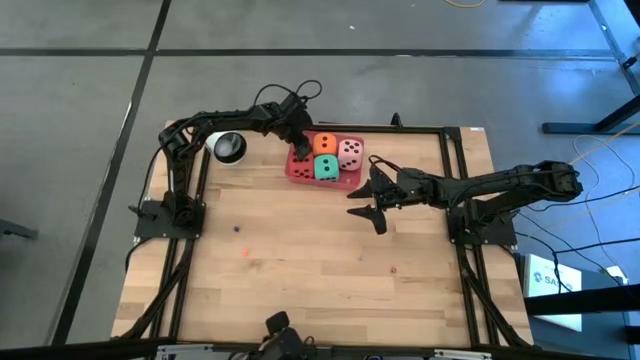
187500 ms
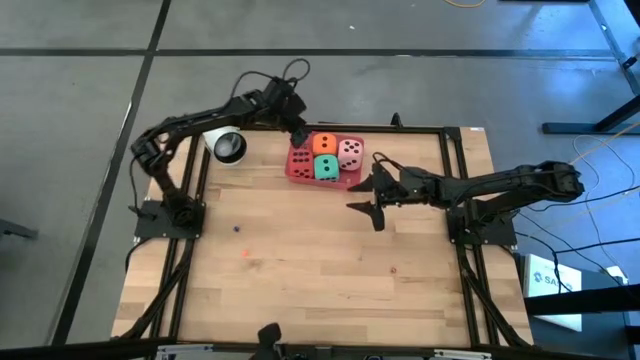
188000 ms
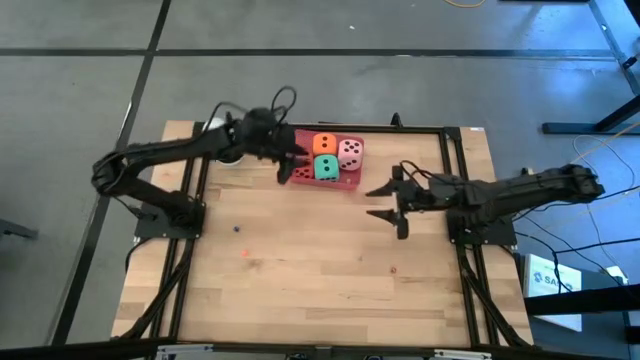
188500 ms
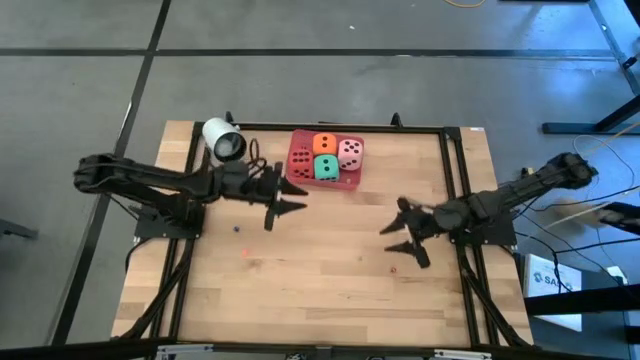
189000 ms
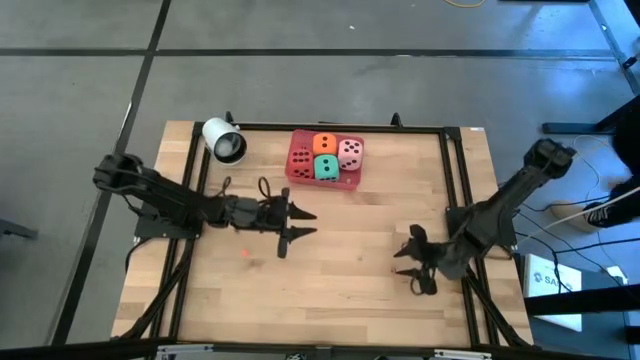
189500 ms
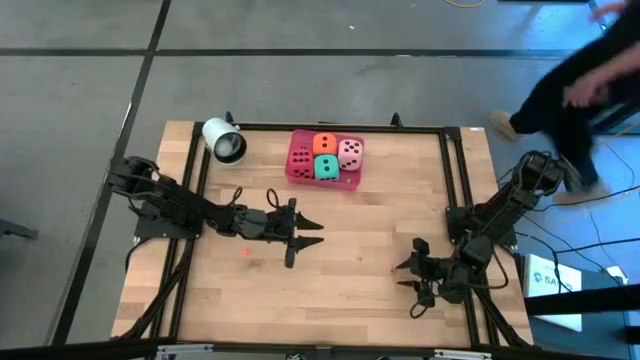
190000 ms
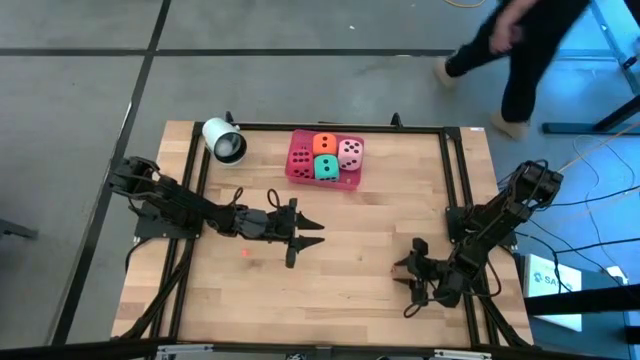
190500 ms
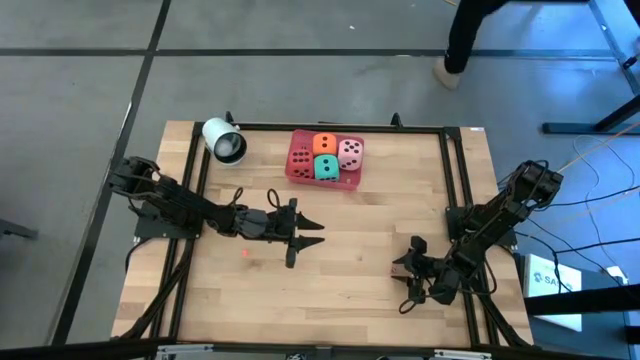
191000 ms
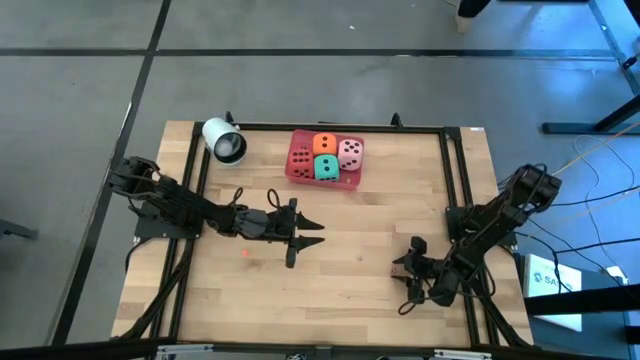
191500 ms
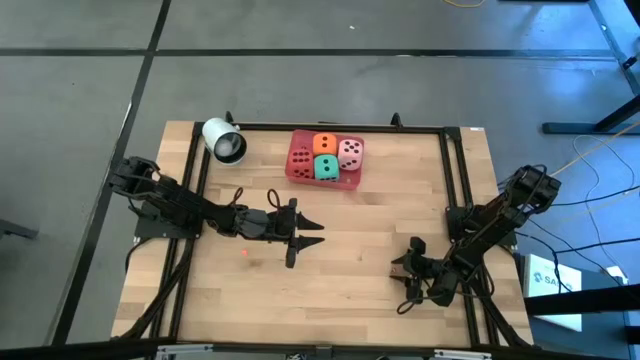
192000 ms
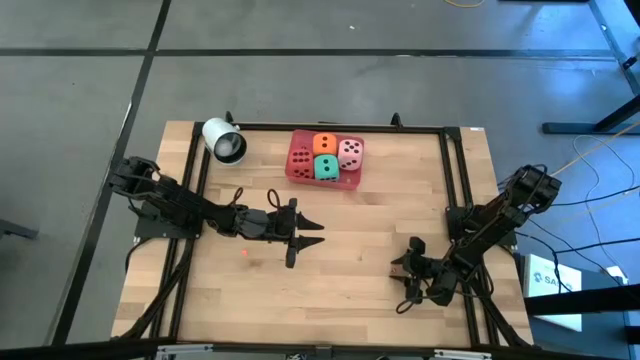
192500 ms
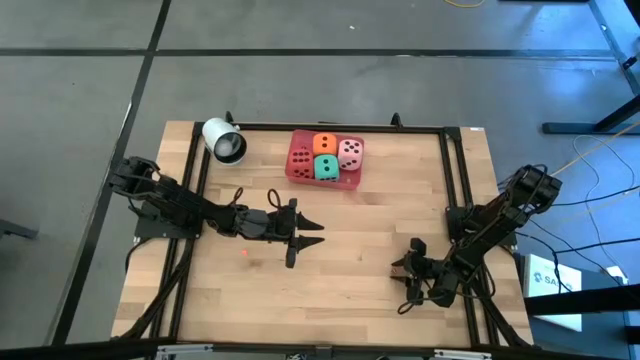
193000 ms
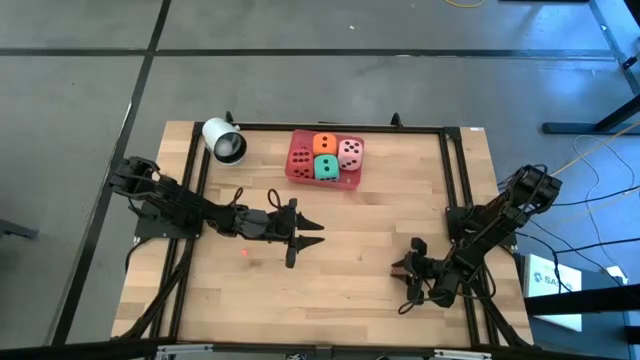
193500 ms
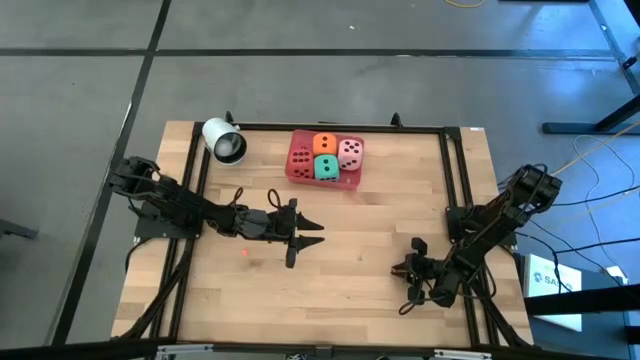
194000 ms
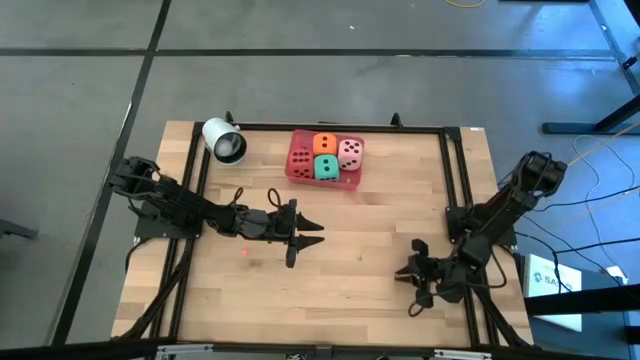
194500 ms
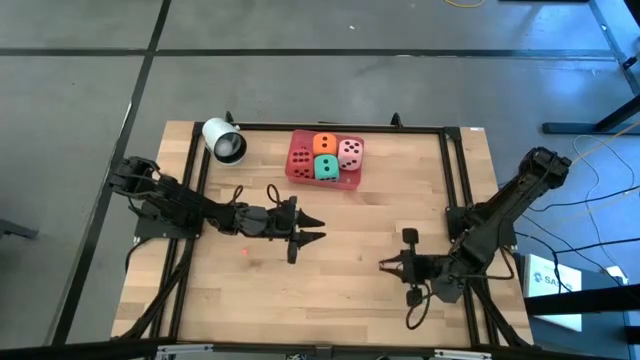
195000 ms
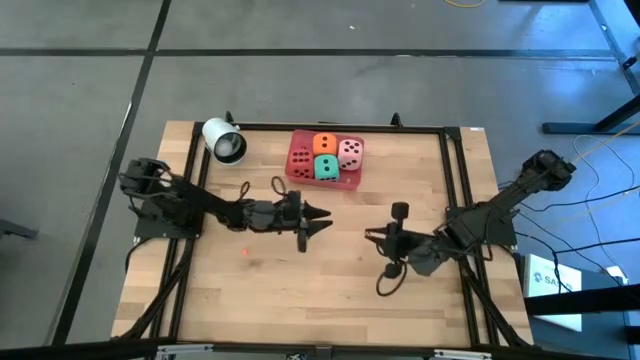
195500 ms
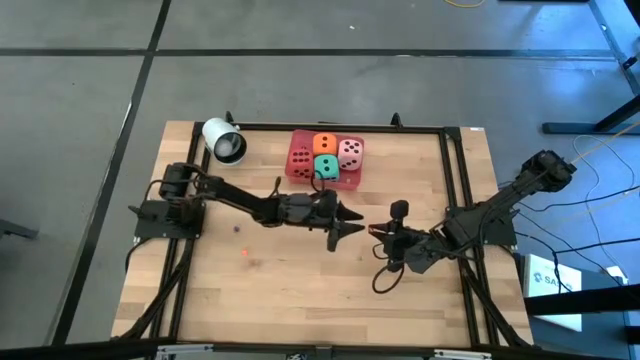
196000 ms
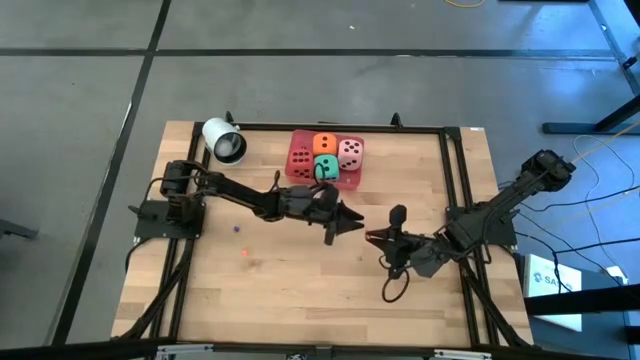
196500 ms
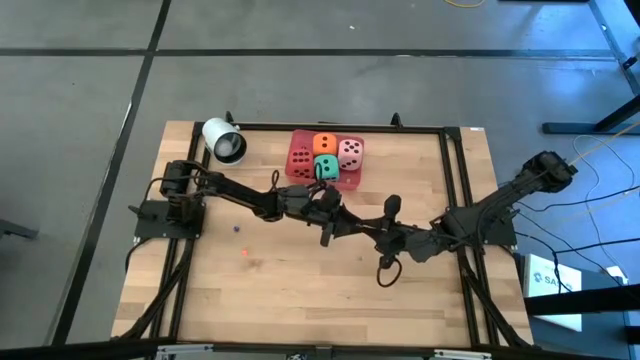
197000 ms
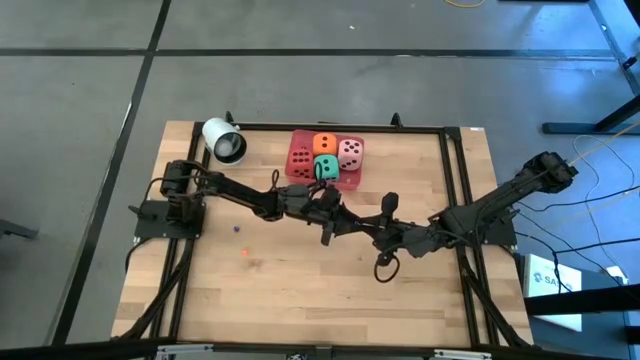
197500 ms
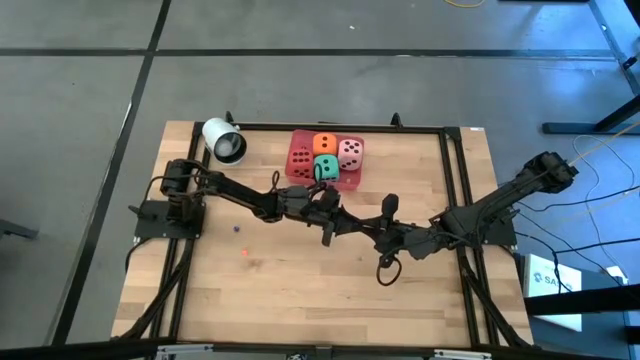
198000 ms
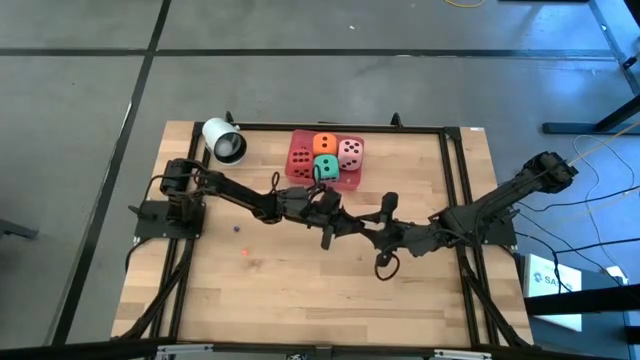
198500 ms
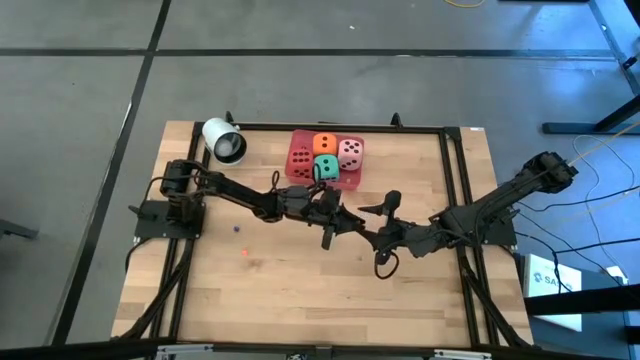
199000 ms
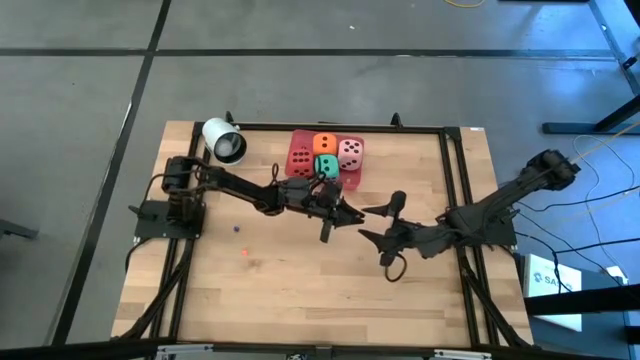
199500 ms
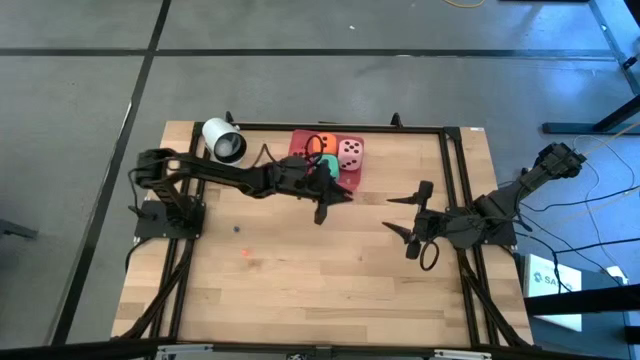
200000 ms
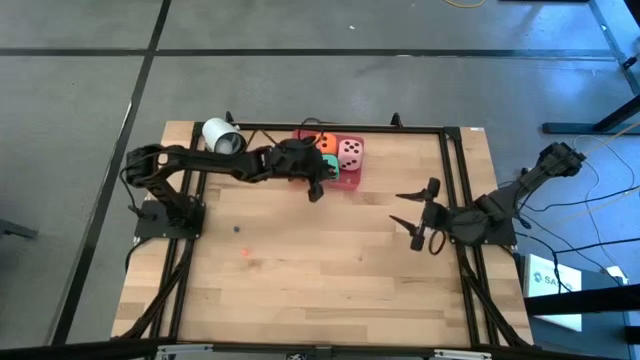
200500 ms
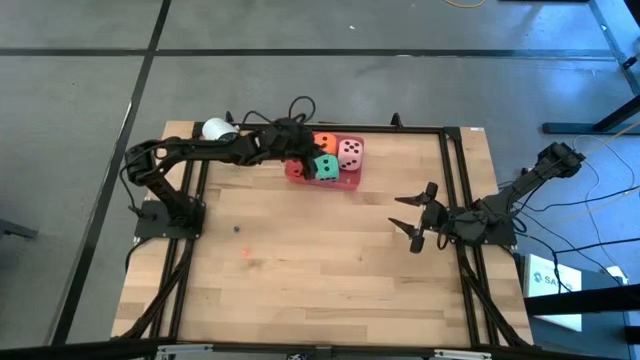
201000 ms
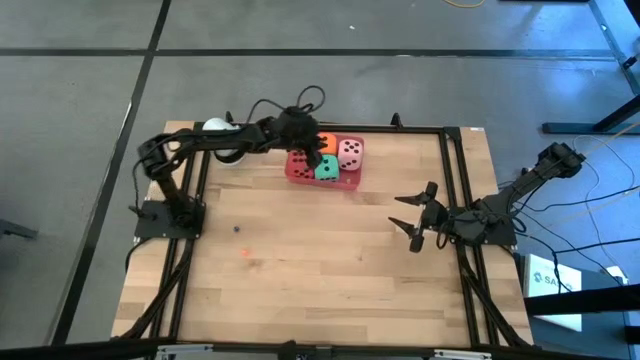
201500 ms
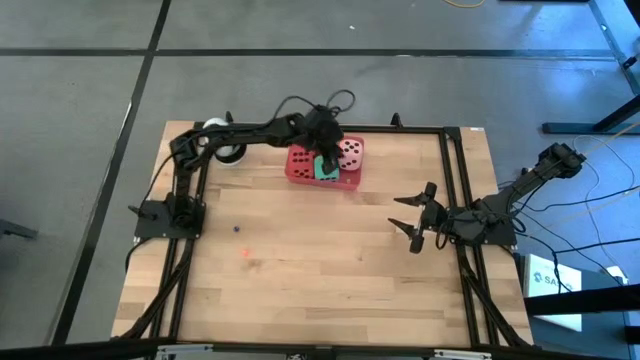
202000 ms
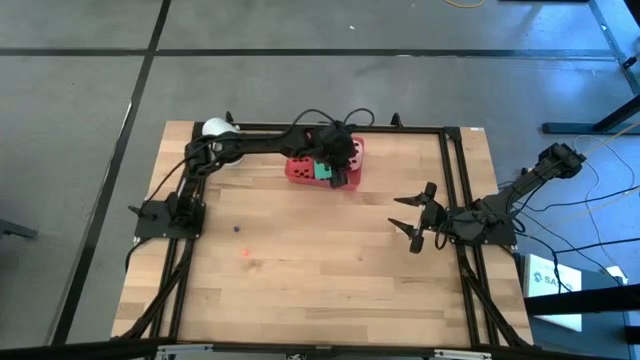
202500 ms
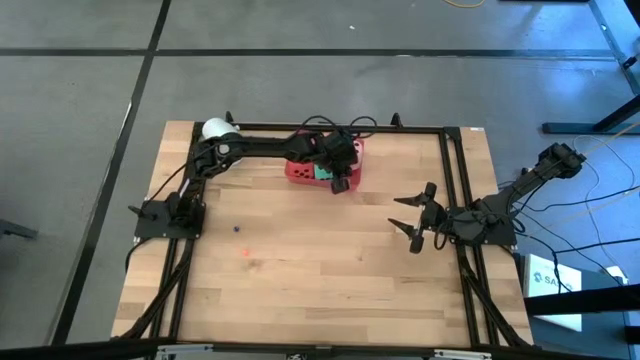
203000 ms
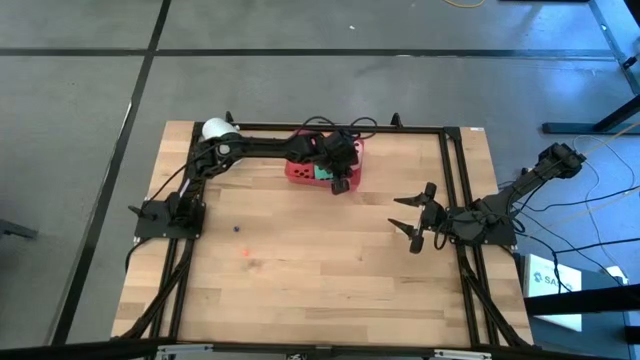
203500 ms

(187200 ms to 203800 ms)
Task: Pick & Place Dice
Put the red die into the pink bin

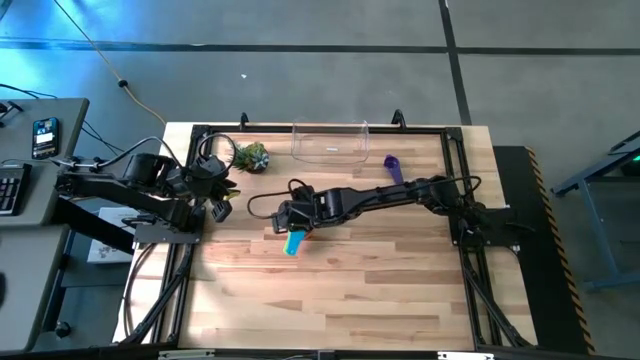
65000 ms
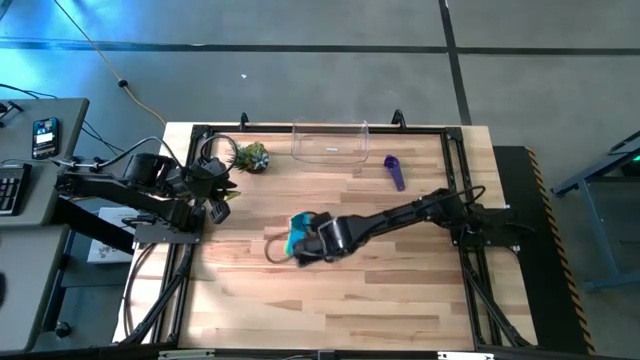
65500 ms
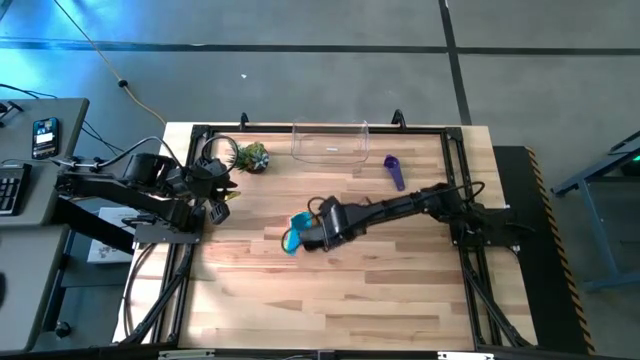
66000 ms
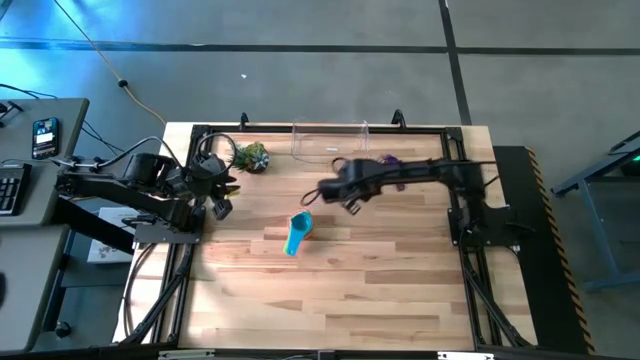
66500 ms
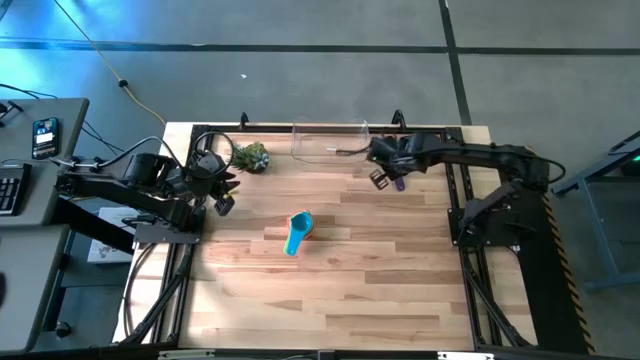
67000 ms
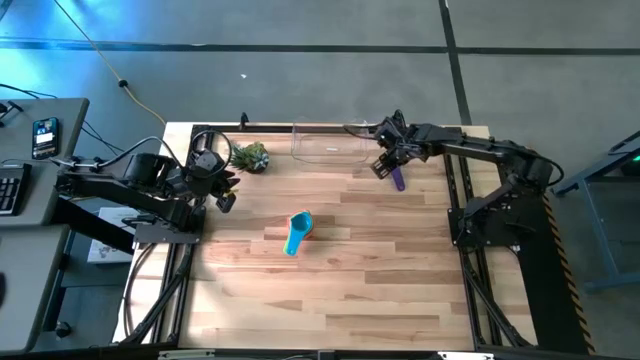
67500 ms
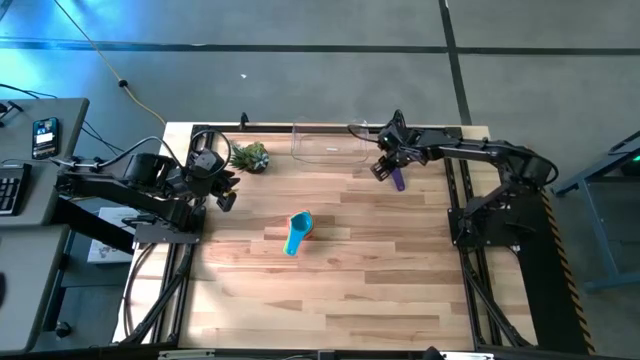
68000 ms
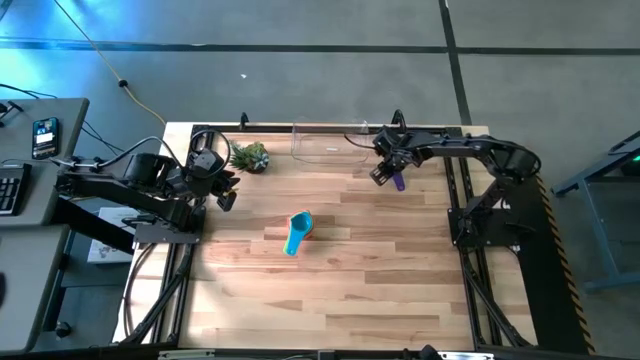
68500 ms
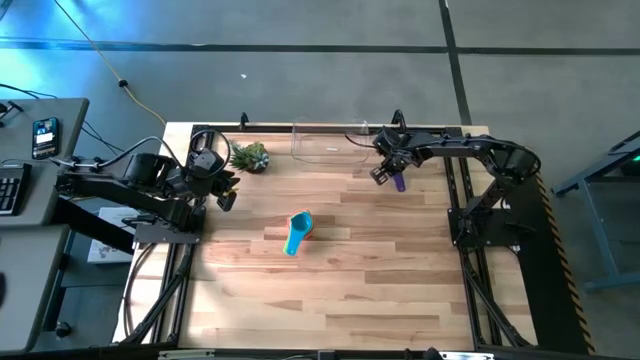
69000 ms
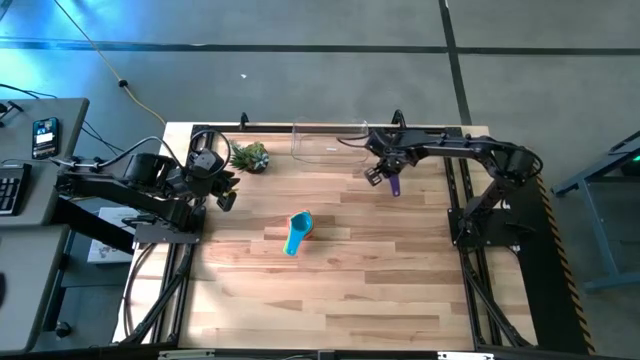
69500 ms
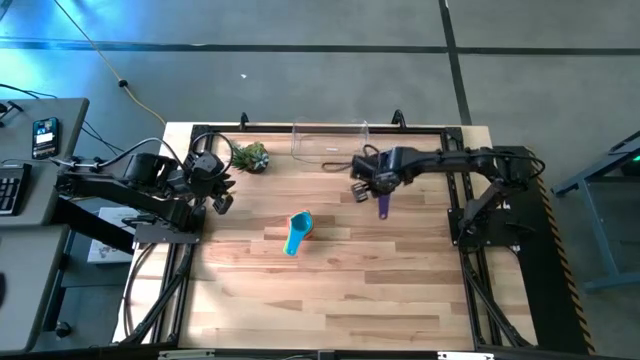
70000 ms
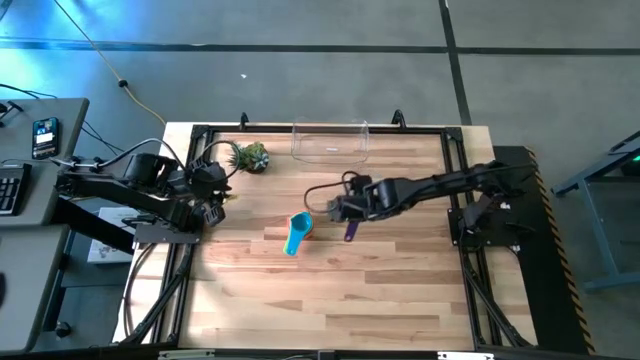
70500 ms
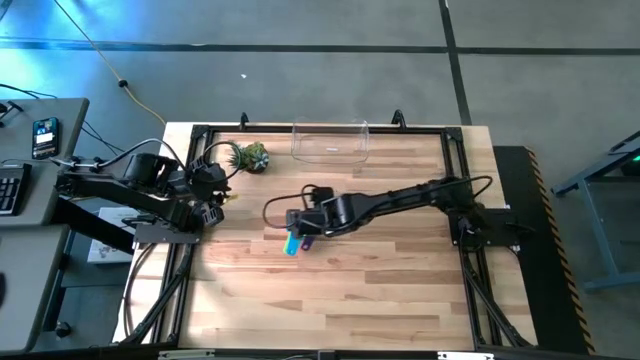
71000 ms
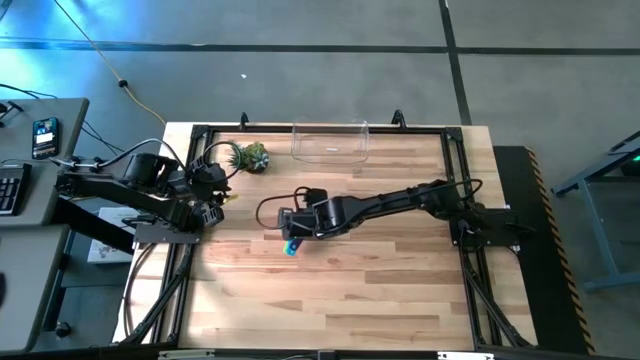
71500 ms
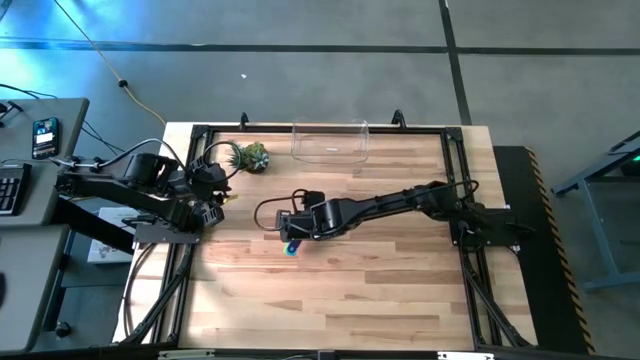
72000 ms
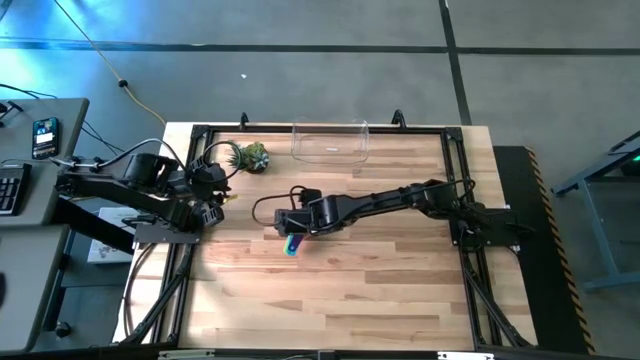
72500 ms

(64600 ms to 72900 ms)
Task: Nest measuring cups in basket
Stack the violet measuring cup on top of the light blue measuring cup
